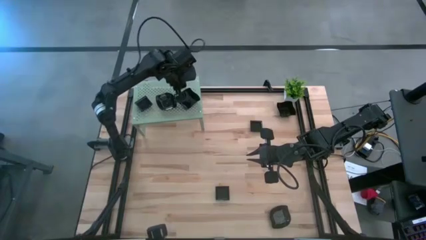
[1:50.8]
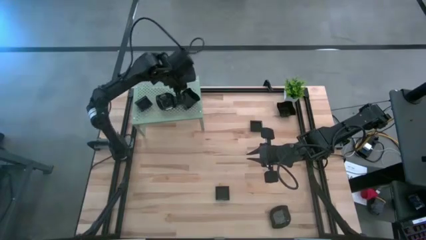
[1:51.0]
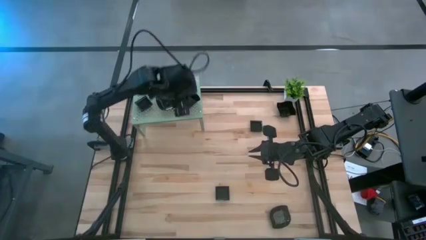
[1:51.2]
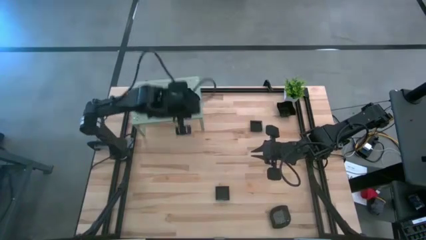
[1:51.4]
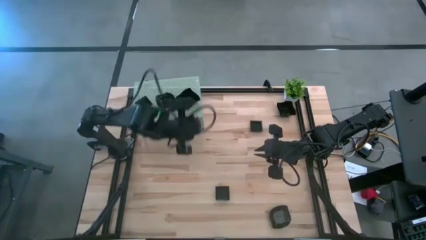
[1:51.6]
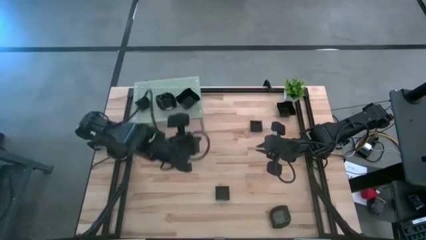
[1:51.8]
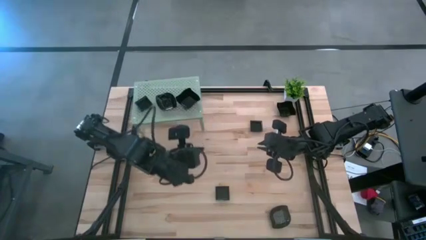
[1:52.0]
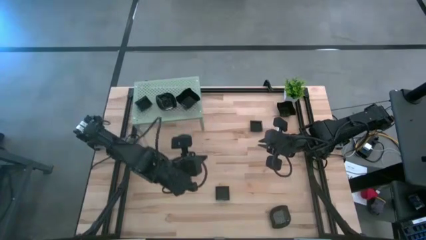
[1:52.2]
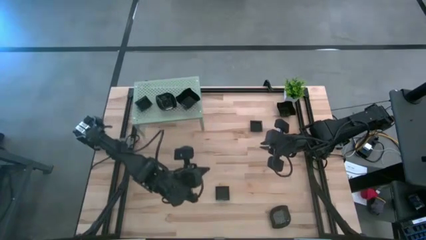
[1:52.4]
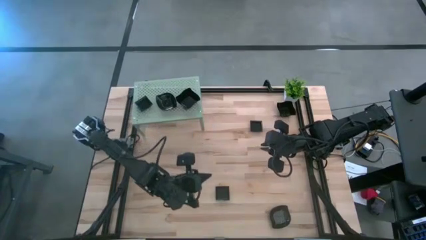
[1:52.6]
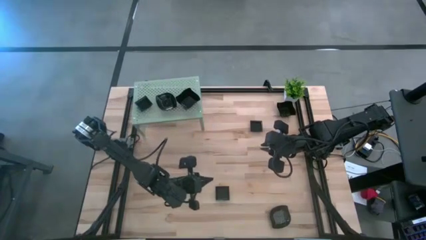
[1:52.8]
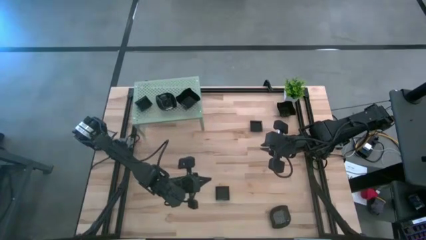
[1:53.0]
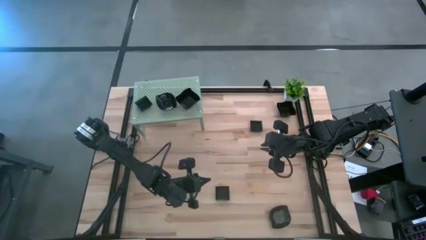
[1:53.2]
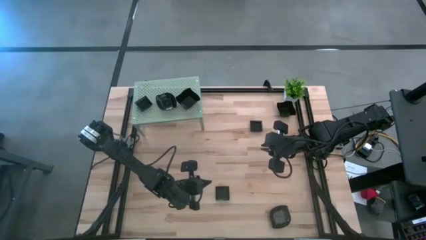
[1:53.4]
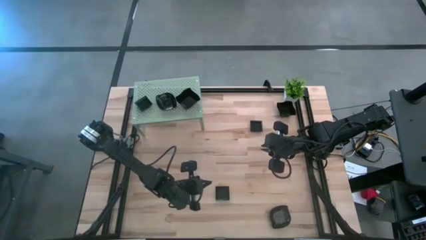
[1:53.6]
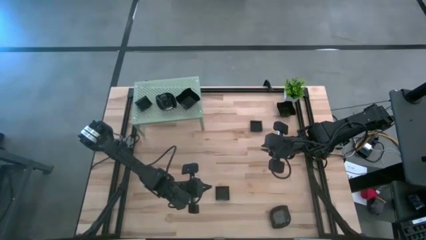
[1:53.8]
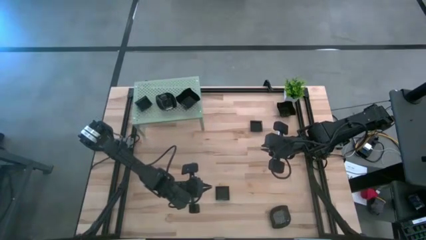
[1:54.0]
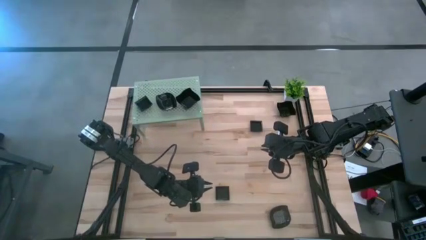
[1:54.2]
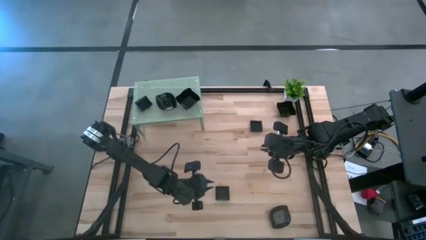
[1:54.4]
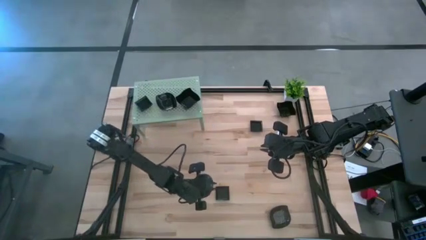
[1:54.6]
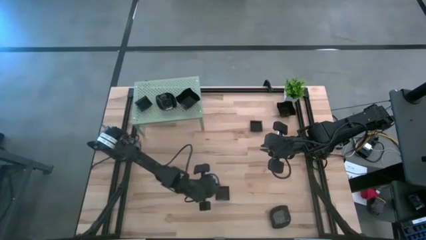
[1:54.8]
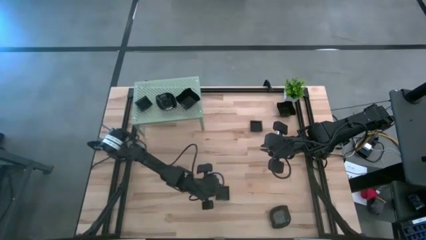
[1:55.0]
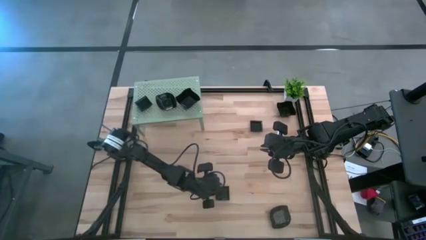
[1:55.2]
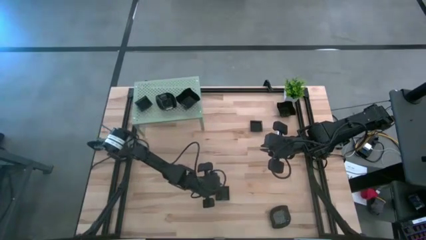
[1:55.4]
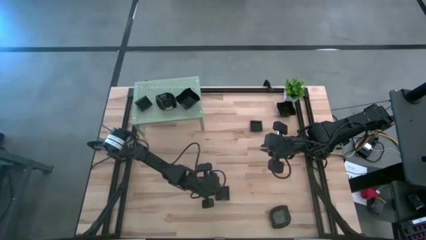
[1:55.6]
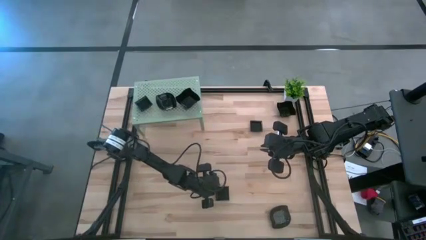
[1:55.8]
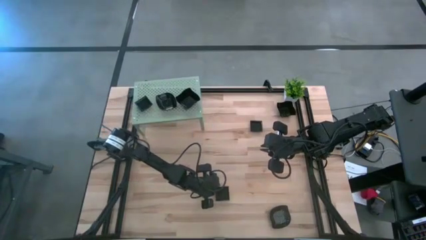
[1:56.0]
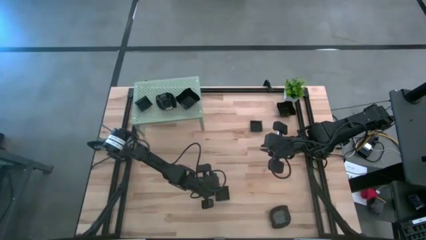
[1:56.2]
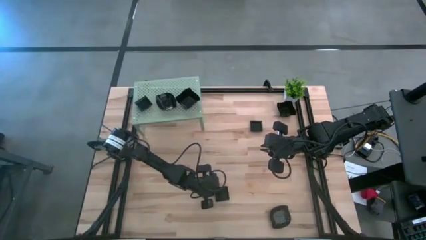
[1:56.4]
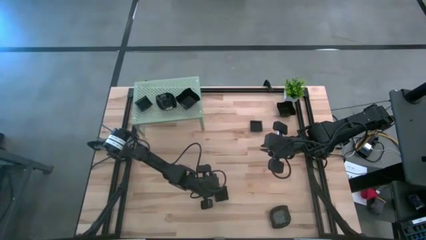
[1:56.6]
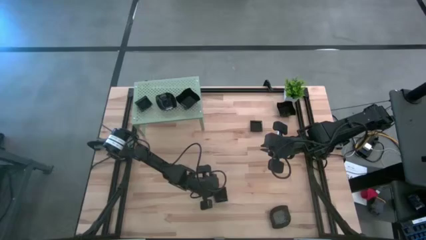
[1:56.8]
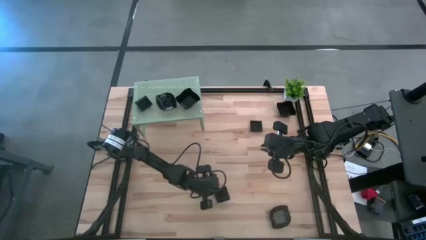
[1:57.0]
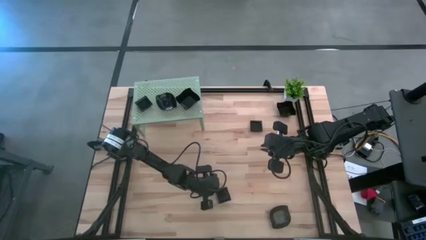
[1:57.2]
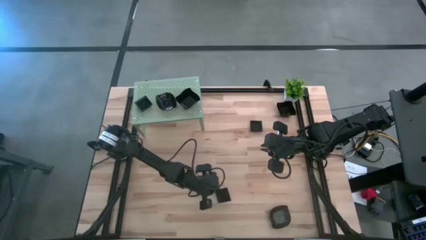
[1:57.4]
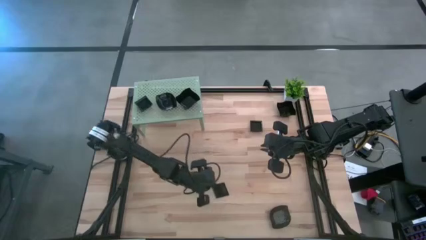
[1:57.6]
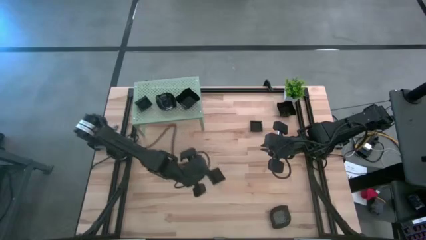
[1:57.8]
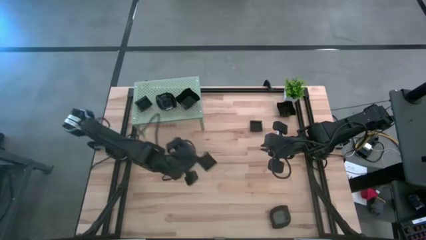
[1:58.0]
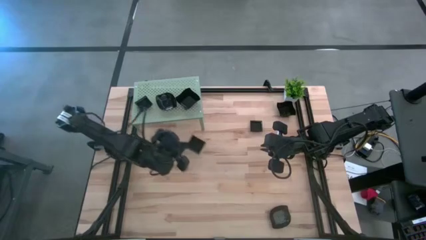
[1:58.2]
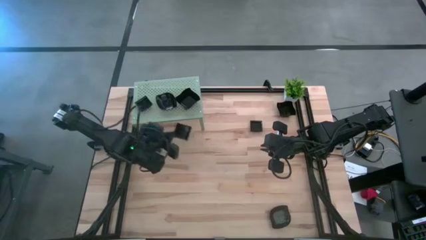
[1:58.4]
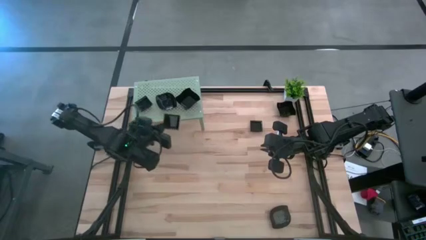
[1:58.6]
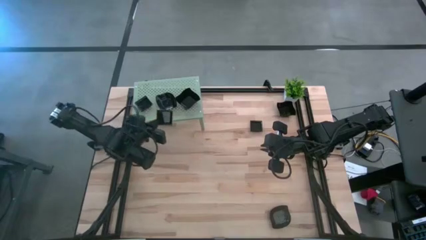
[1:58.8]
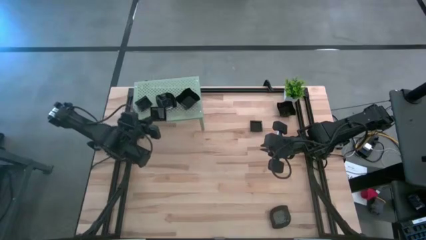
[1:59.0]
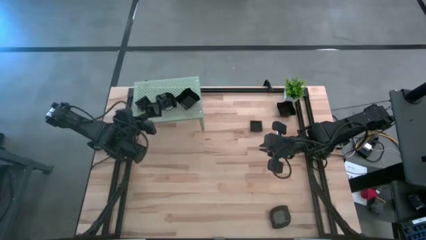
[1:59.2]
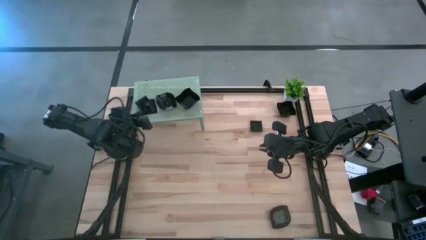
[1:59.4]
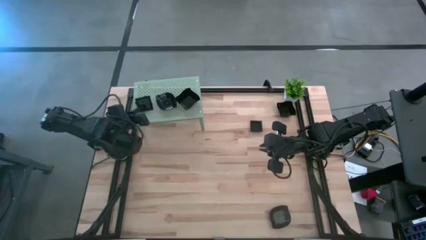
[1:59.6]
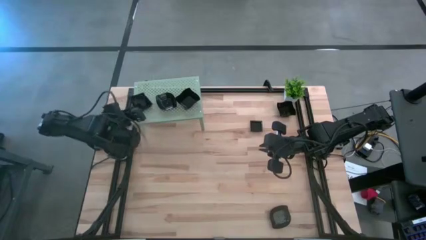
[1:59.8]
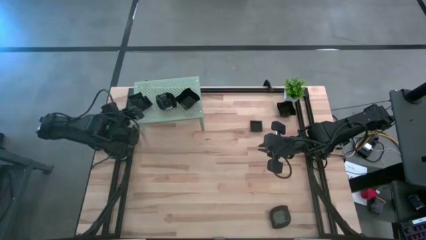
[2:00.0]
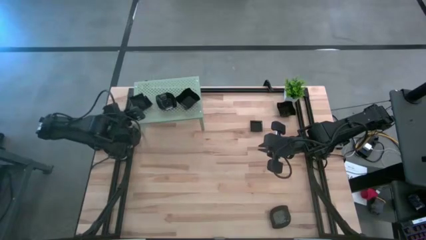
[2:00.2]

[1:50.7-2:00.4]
Task: Pick & Place Mini shaped plates
Stack the black square shaped plate on top of the square shaped plate on the shelf

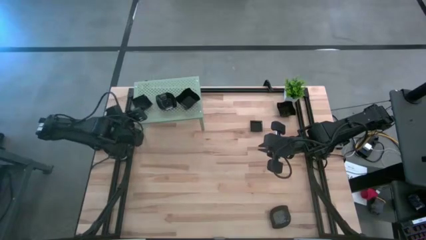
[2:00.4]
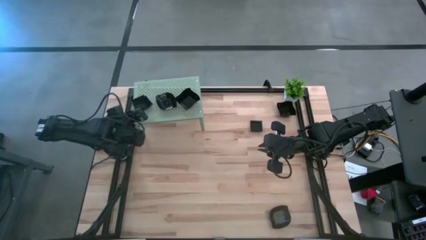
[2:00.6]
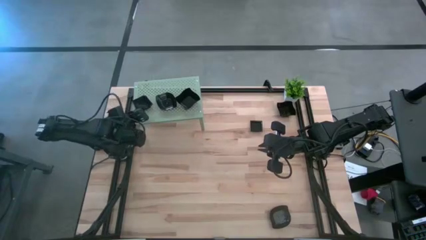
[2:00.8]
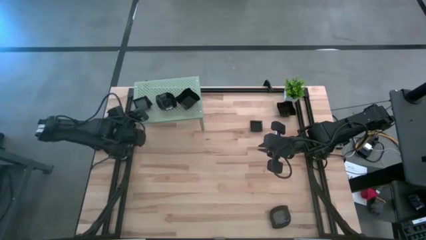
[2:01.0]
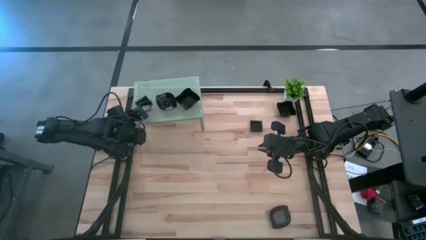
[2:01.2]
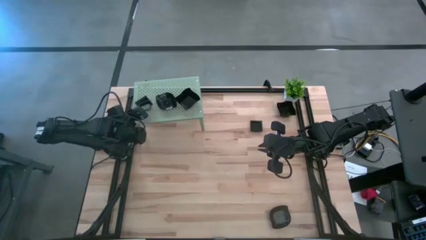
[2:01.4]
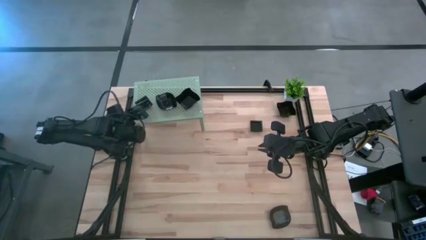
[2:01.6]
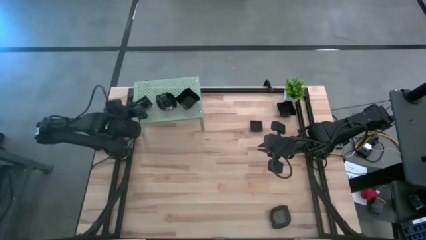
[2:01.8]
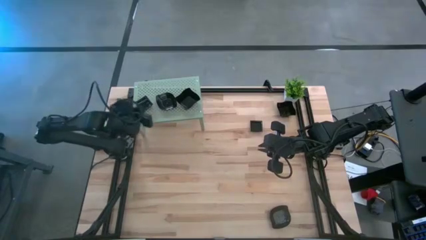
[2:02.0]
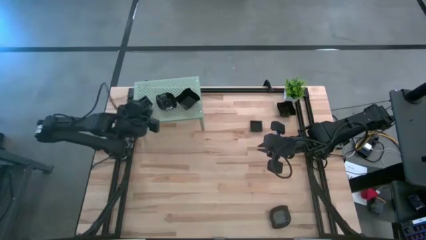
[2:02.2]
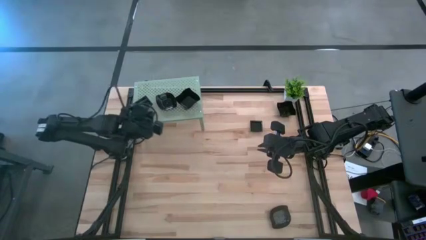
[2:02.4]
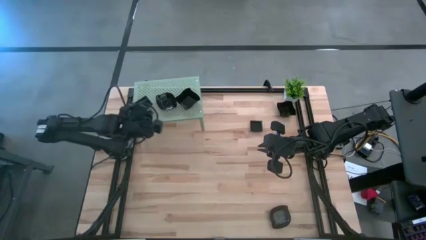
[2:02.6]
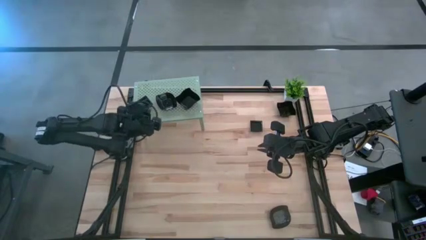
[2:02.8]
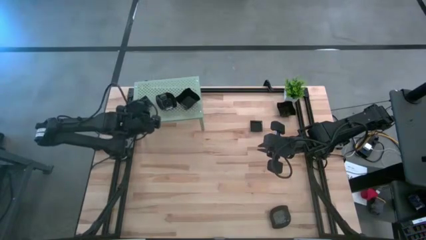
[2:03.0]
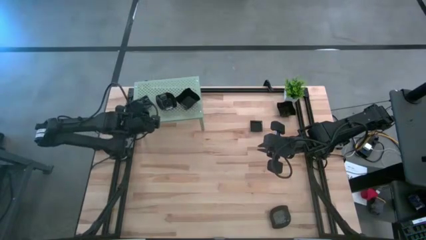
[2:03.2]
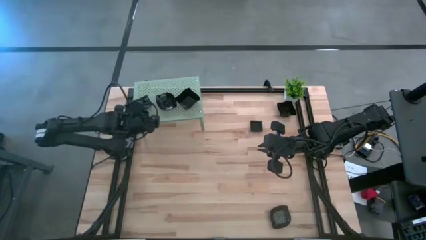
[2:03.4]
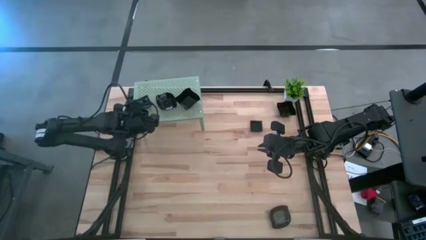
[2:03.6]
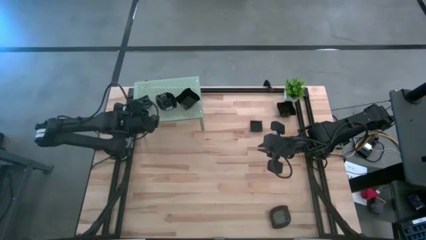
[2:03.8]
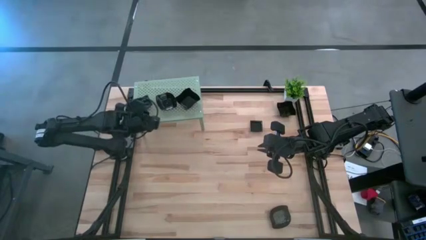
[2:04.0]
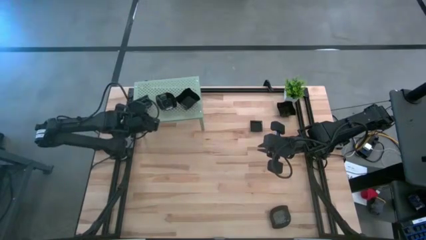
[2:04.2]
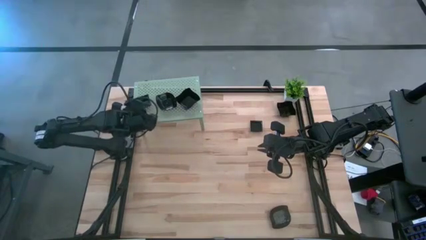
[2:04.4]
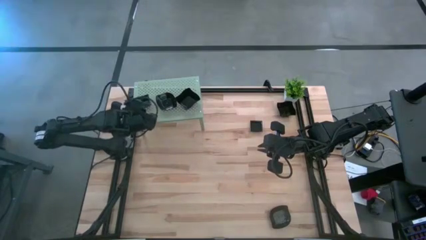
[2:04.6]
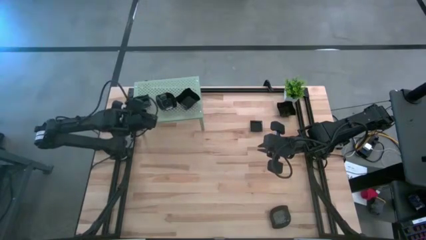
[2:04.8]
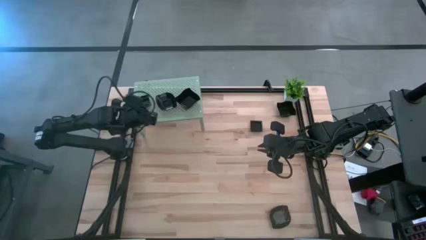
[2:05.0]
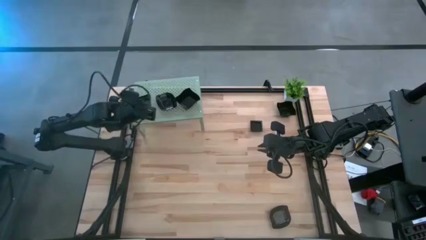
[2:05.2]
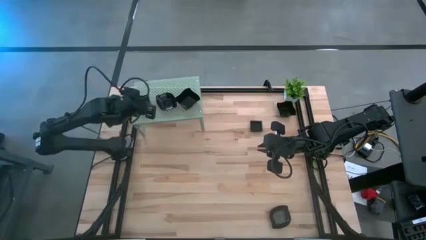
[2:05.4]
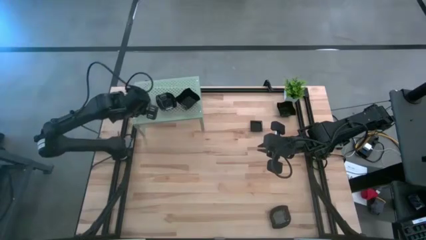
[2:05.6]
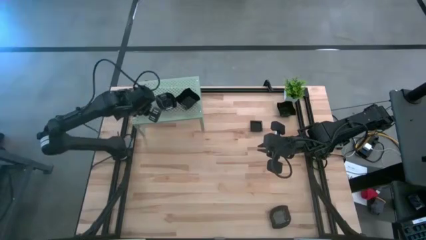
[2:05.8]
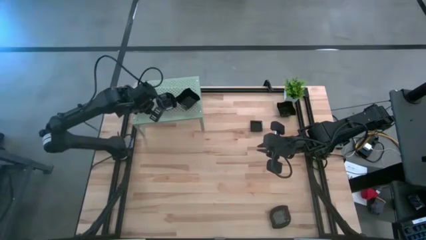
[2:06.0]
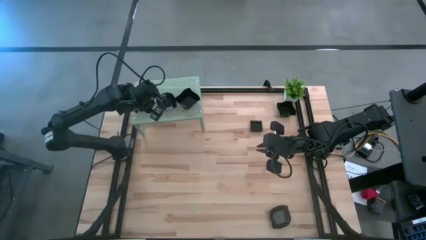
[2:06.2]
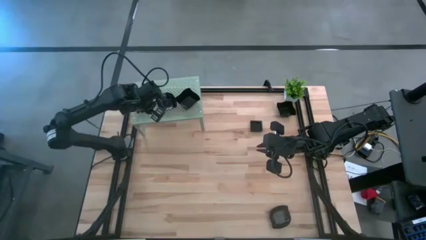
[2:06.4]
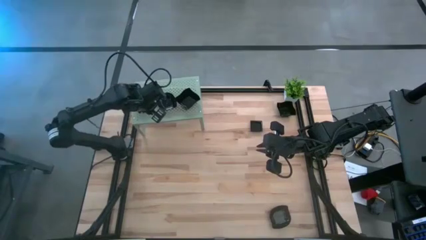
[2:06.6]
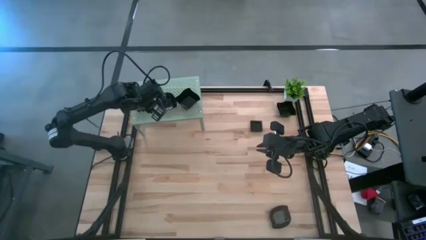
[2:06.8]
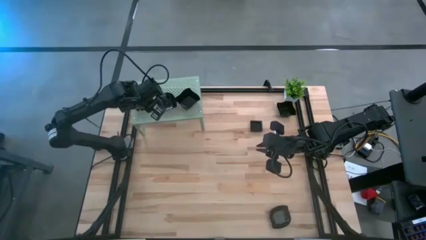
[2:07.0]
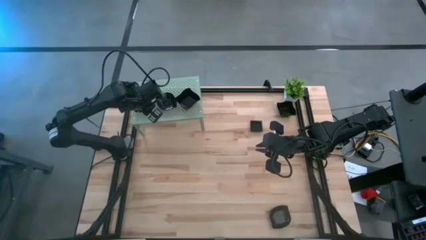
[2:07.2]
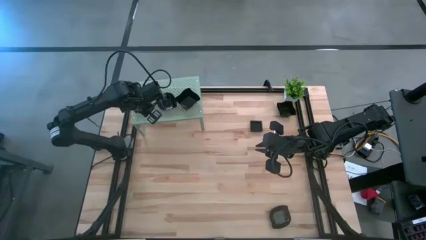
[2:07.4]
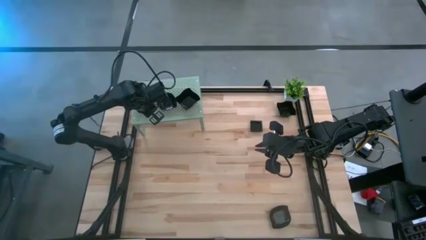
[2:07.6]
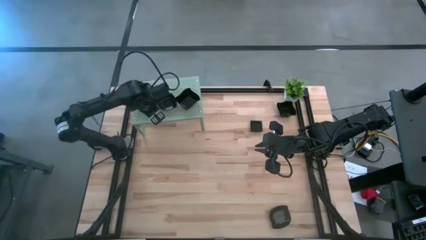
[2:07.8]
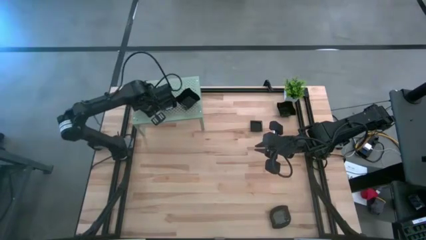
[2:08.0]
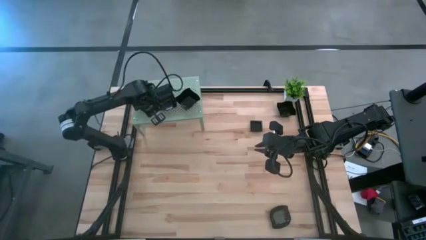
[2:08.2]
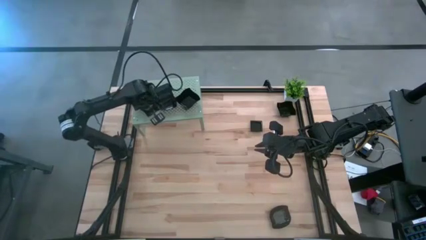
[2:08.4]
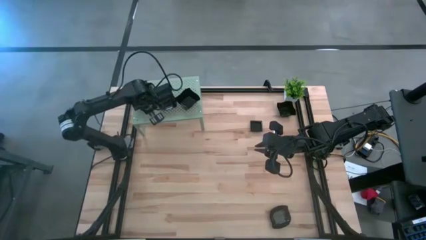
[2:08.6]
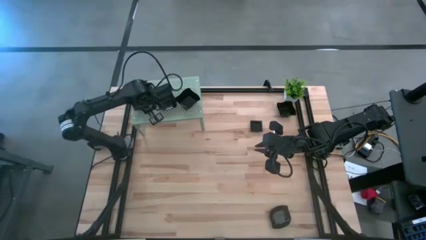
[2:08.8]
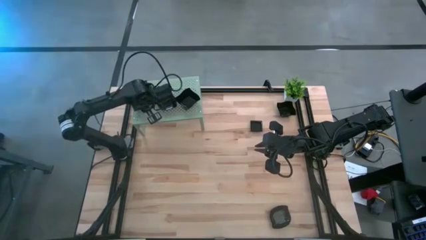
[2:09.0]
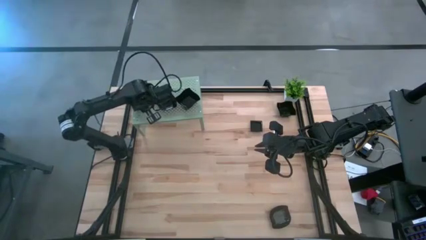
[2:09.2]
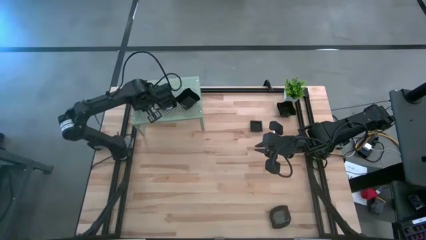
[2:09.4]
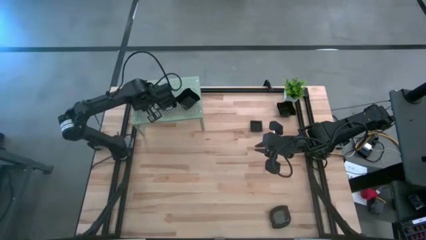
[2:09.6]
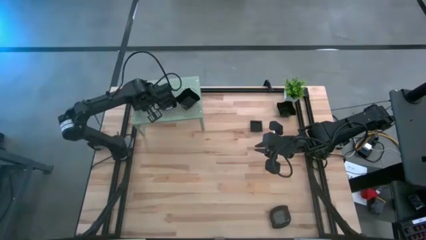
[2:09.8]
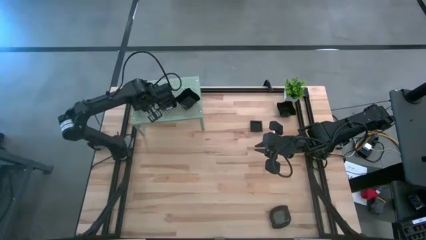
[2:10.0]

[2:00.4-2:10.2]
Stack the black square shaped plate on top of the square shaped plate on the shelf
